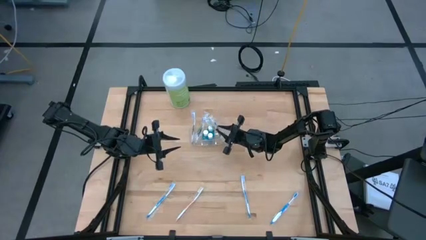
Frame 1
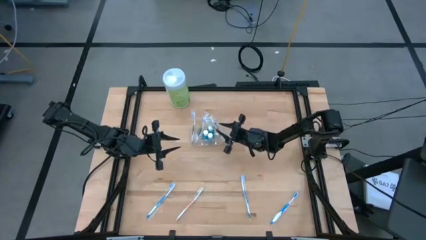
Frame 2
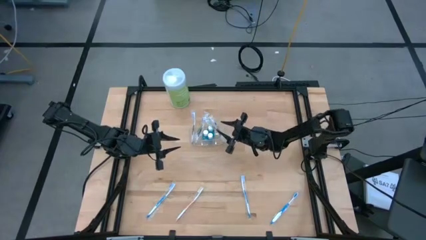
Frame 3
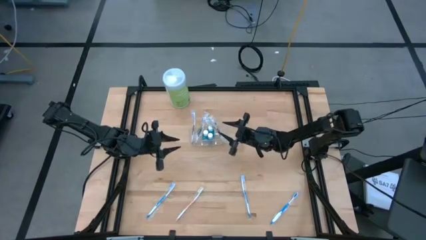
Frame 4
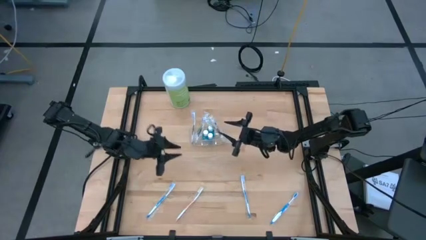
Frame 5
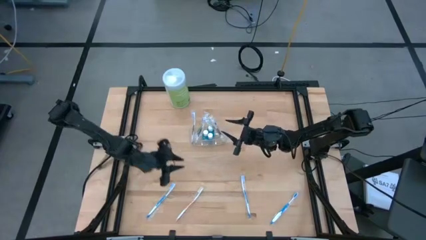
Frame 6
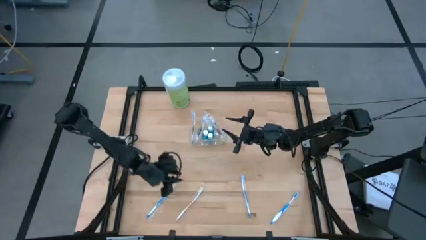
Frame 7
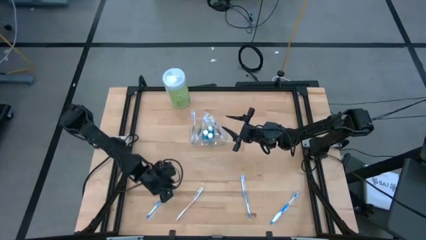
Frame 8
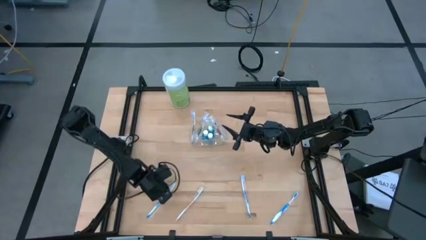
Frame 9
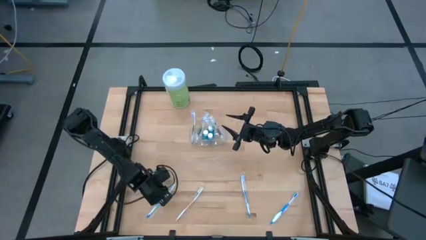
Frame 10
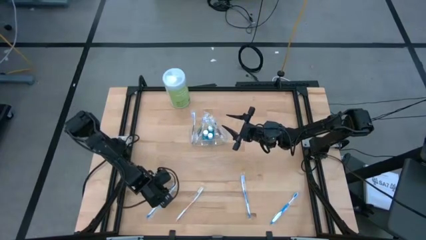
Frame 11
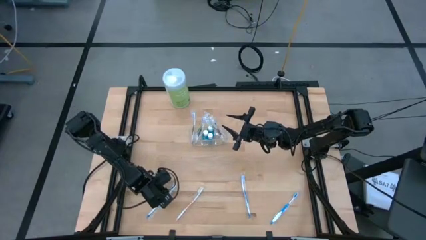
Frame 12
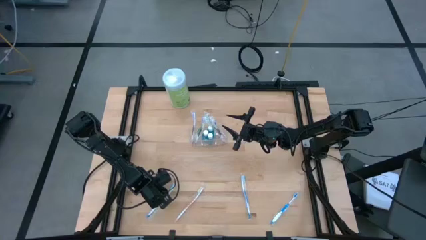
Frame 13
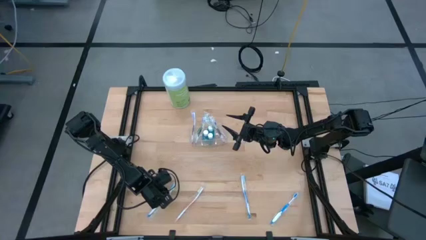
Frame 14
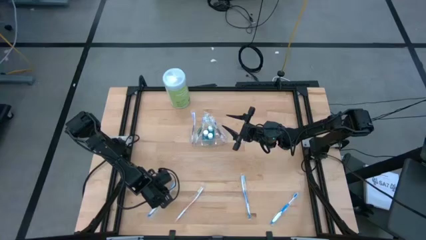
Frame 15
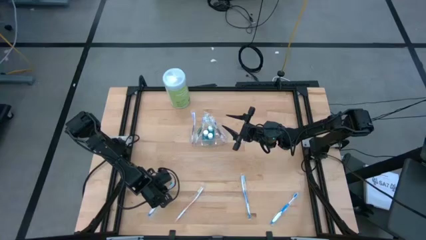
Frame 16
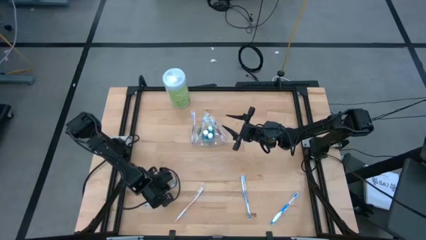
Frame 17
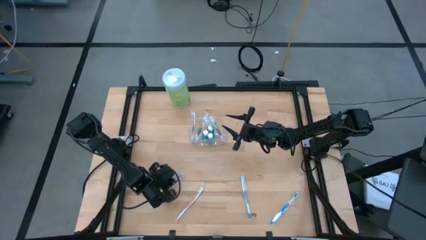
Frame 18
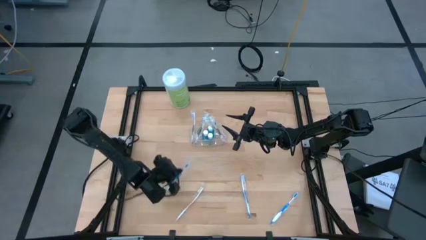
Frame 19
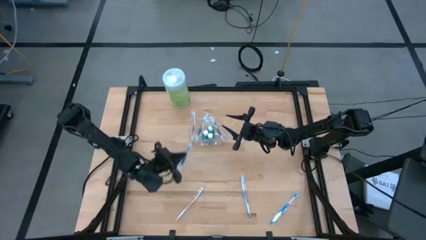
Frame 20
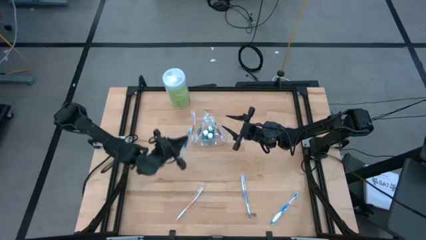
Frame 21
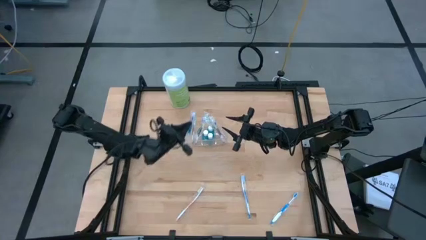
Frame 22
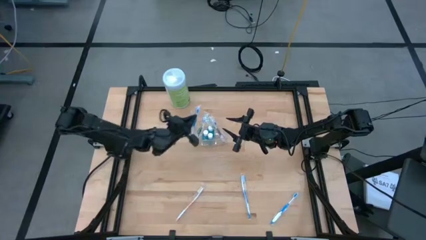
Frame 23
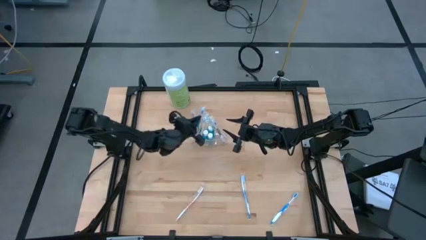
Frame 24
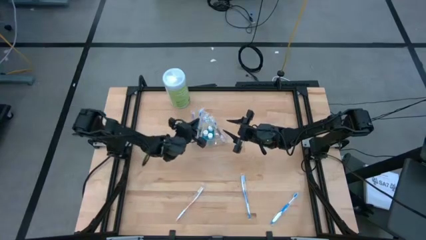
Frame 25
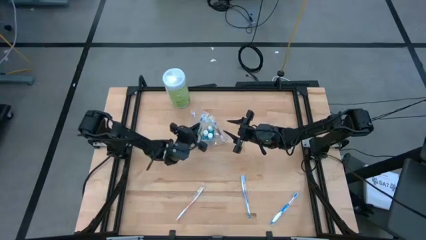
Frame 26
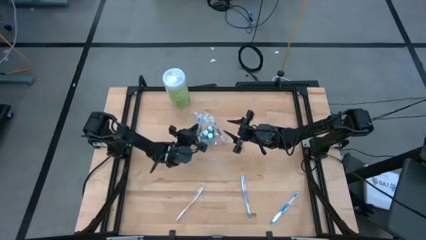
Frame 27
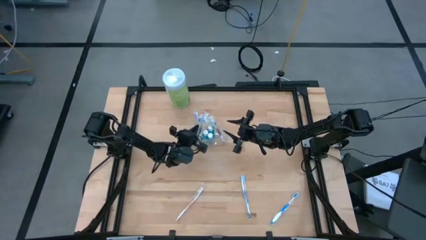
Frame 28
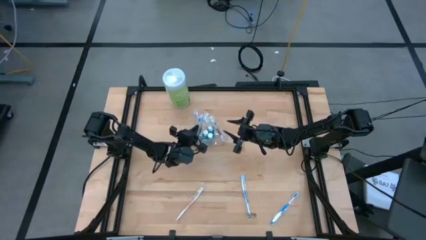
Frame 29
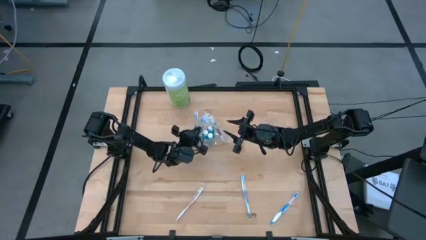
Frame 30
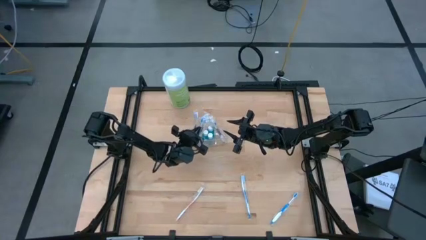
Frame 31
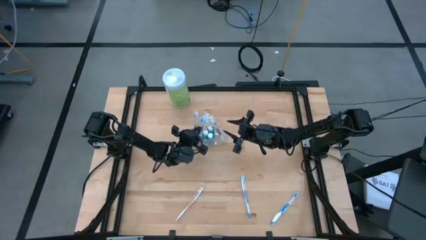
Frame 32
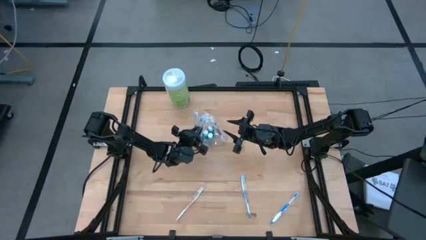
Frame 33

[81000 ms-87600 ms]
Task: Pick & Place toothbrushing station
Put the left blue toothbrush into the transparent organizer

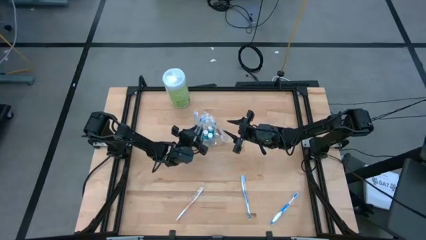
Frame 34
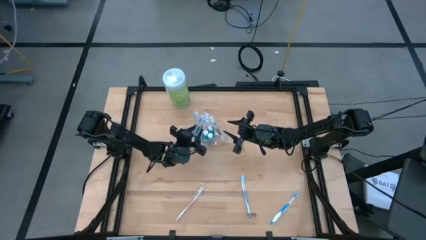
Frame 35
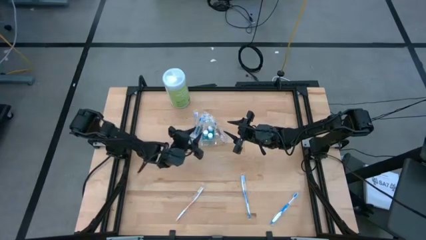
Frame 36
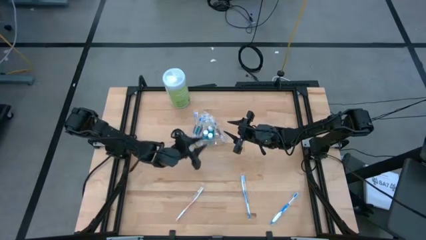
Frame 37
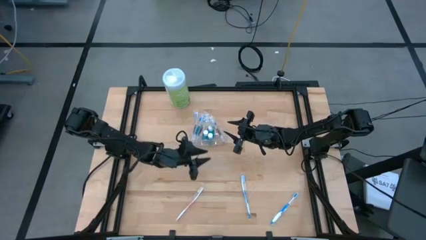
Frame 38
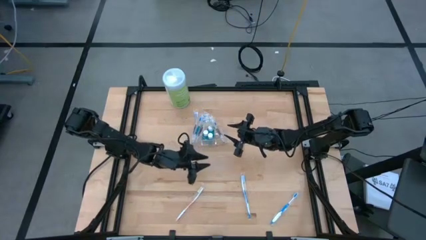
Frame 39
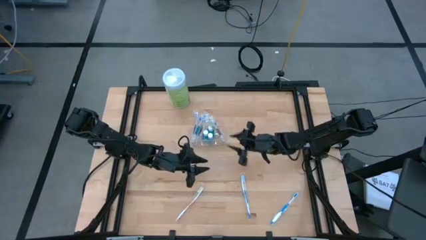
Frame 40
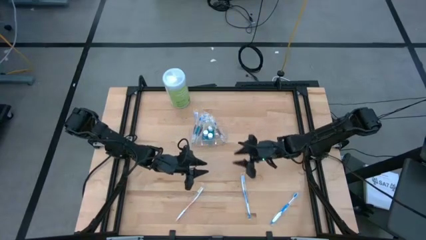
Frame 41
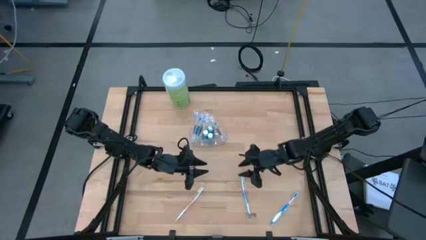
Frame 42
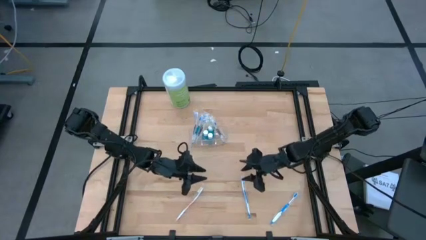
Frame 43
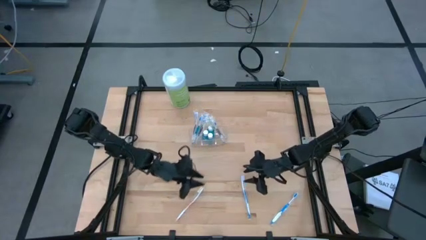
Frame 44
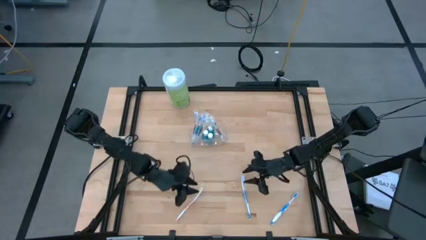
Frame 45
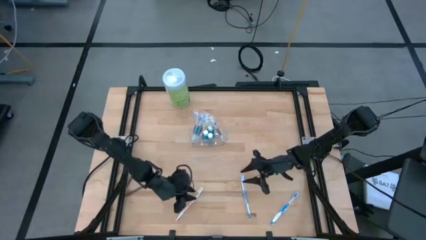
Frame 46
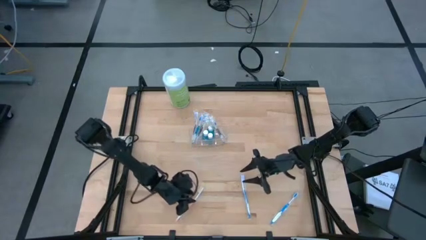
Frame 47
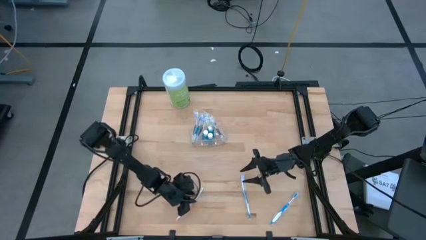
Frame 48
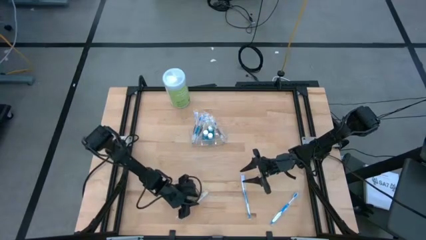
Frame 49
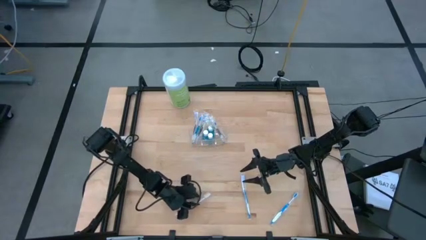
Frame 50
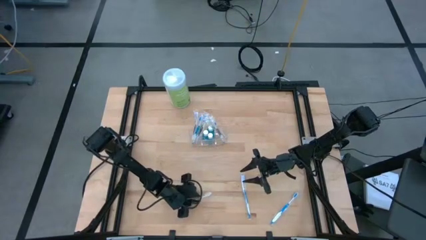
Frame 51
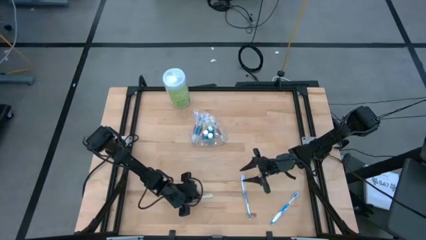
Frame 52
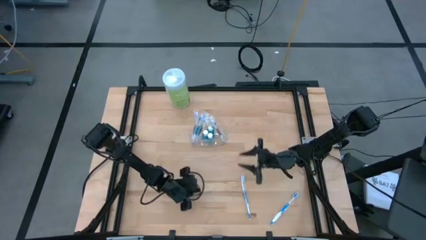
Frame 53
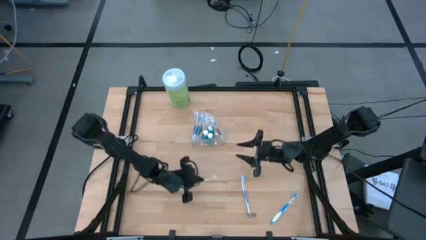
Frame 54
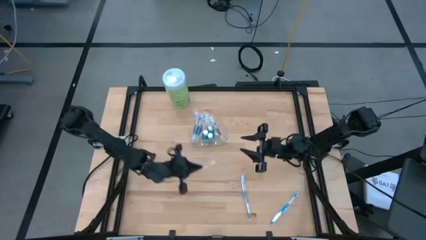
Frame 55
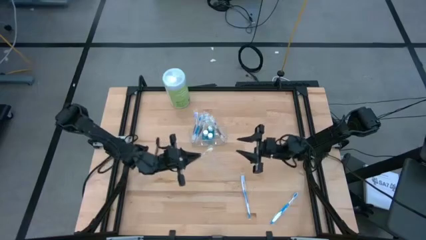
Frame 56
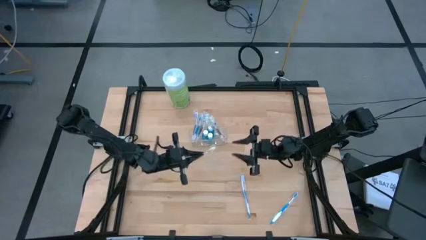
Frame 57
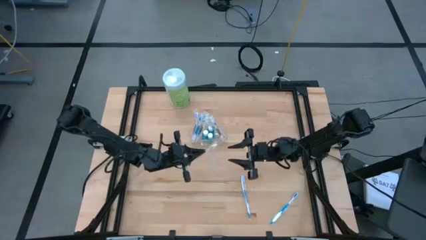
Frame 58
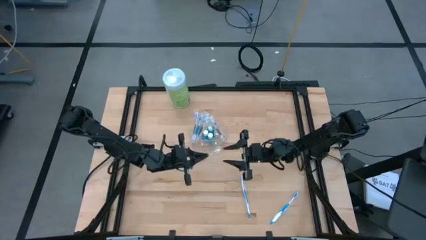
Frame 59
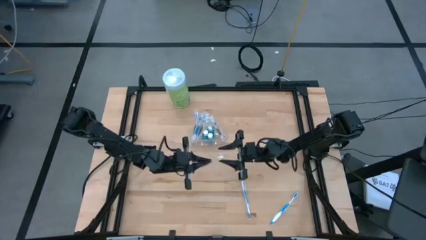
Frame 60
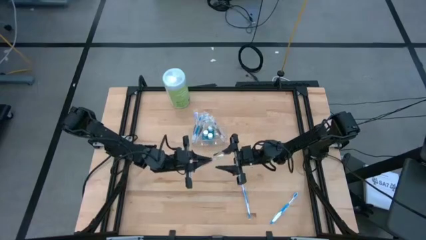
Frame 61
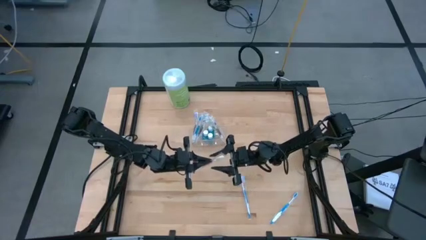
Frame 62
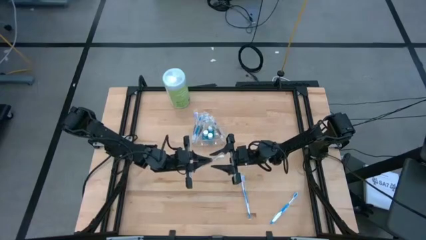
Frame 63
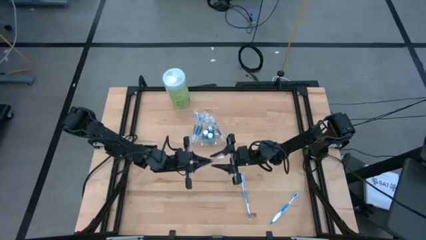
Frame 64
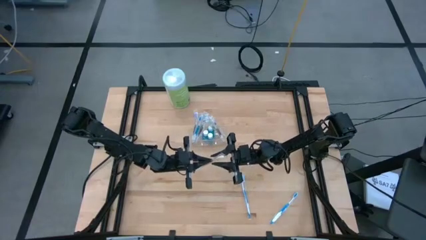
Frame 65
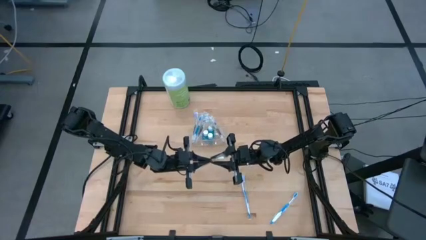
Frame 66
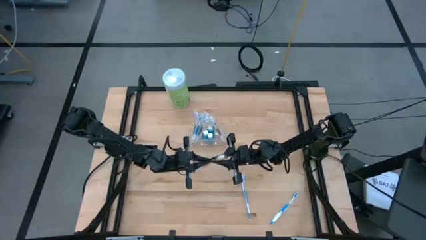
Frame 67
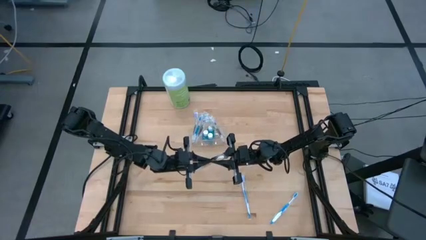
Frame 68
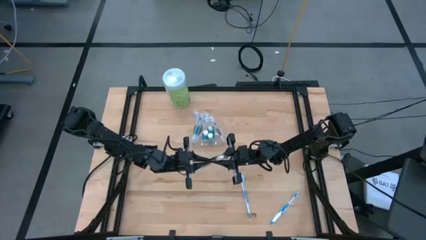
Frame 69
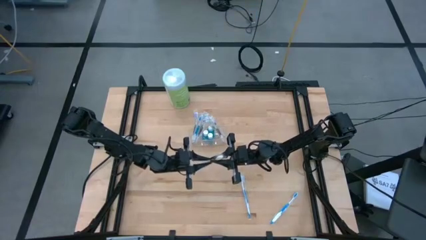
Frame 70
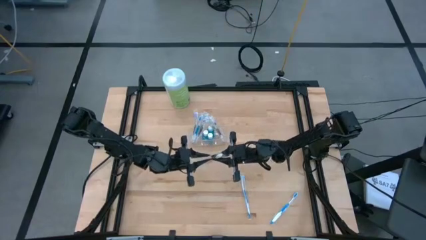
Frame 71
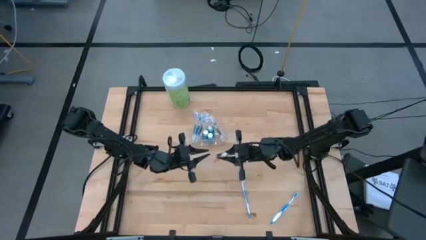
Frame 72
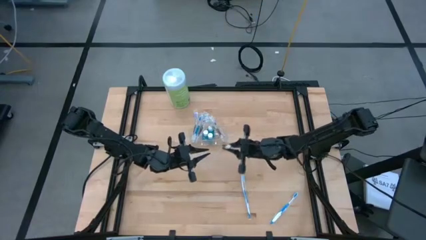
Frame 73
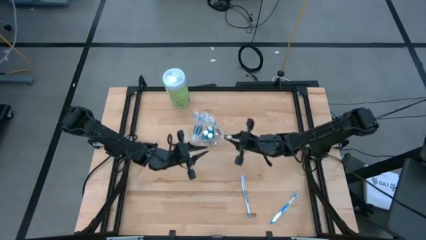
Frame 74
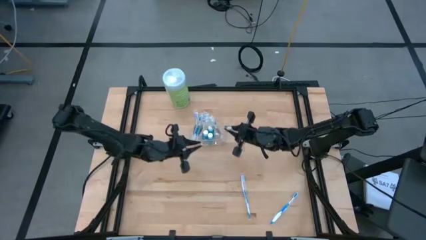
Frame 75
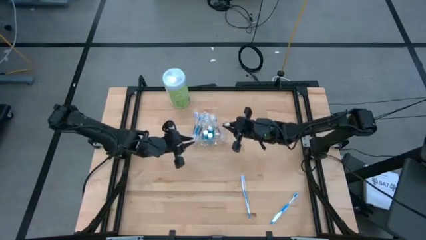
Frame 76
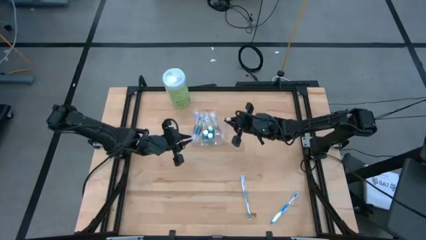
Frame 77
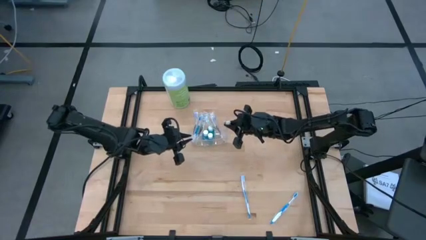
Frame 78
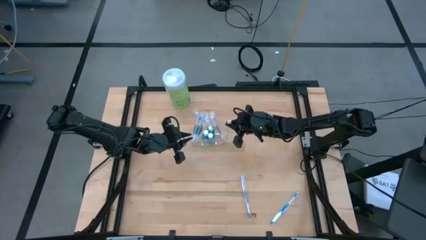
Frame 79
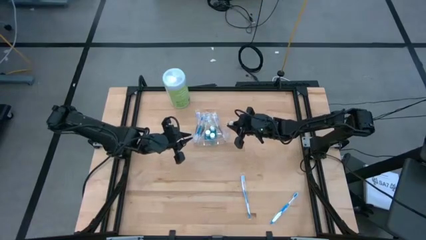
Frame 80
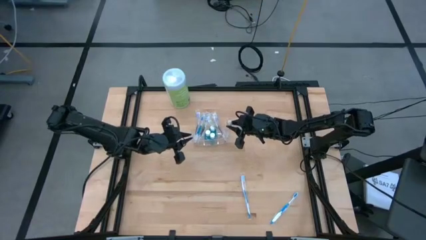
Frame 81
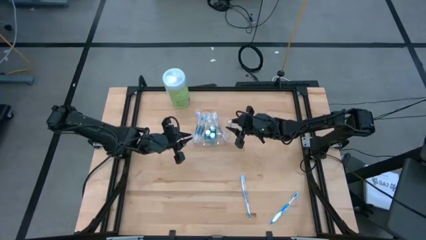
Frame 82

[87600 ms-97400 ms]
Put the orange toothbrush into the transparent organizer

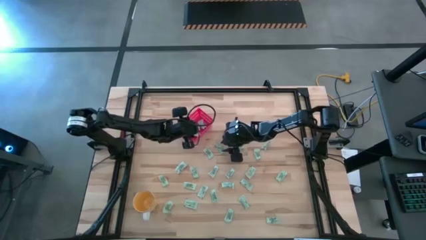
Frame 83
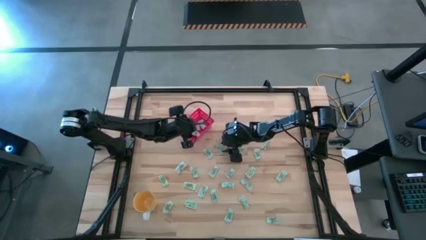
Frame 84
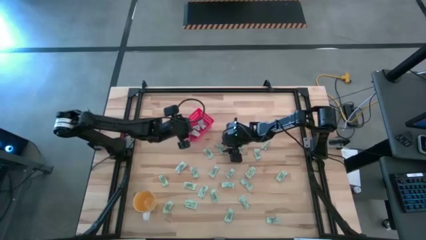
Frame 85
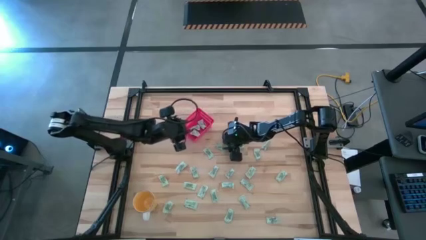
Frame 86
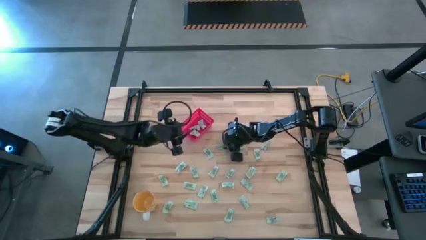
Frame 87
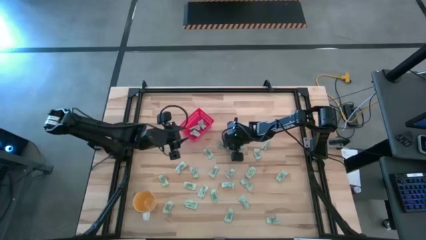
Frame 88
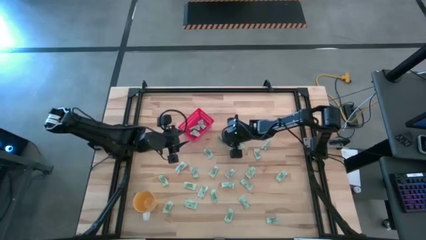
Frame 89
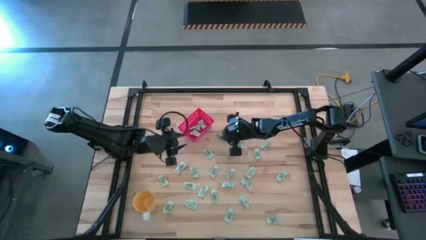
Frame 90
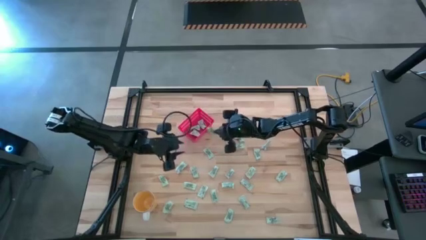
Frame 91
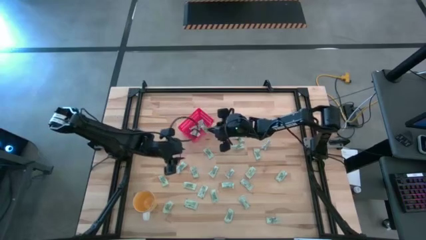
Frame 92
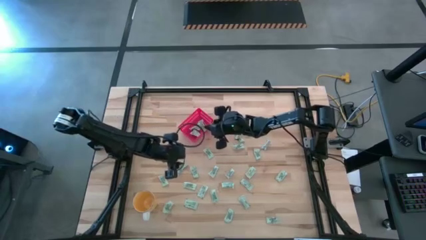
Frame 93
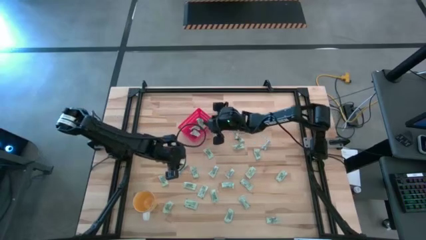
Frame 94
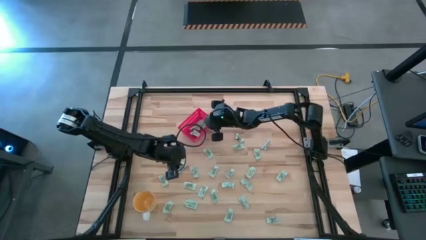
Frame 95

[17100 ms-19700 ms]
Task: Pick and place Stevia / Truvia into bins
Put the white stevia packet into the red bin
